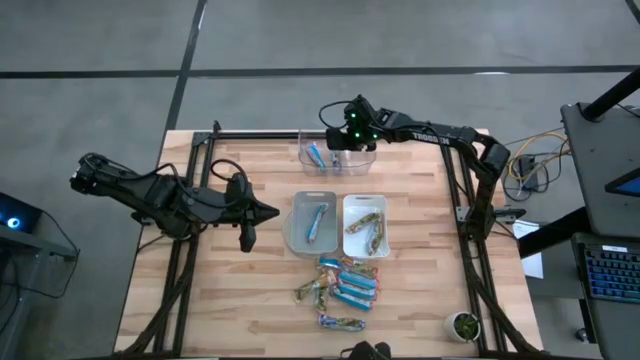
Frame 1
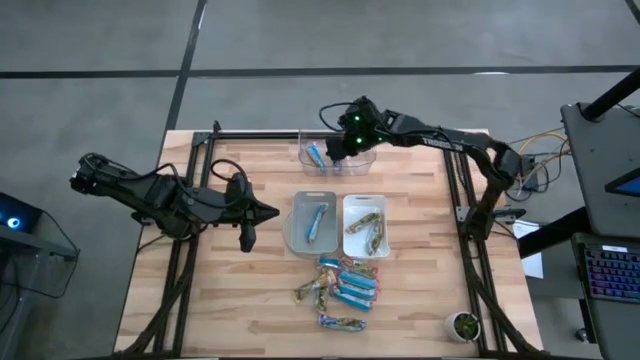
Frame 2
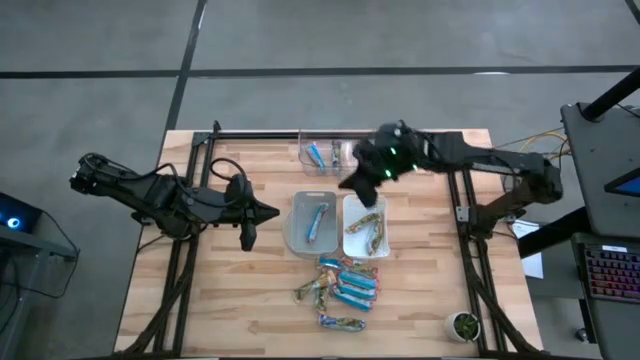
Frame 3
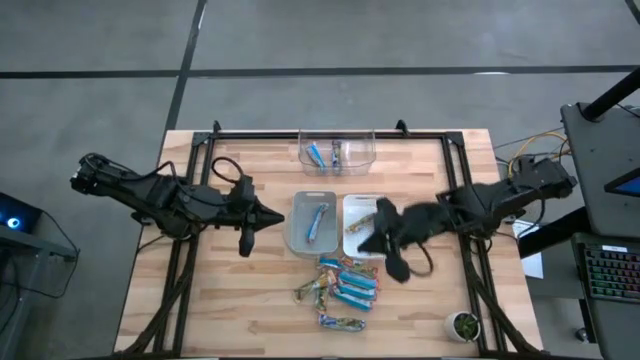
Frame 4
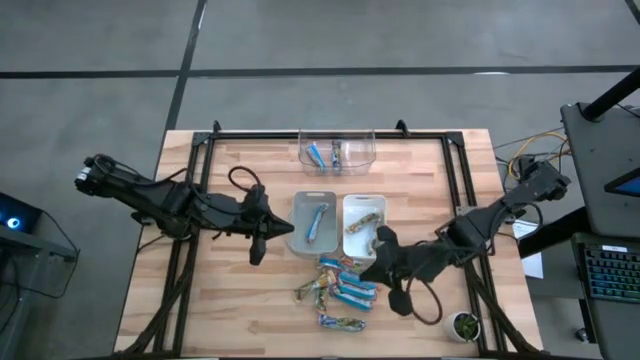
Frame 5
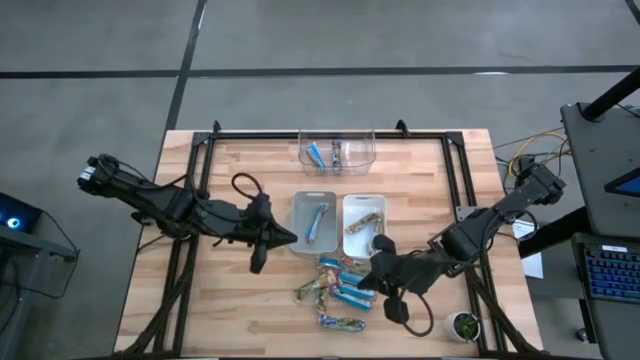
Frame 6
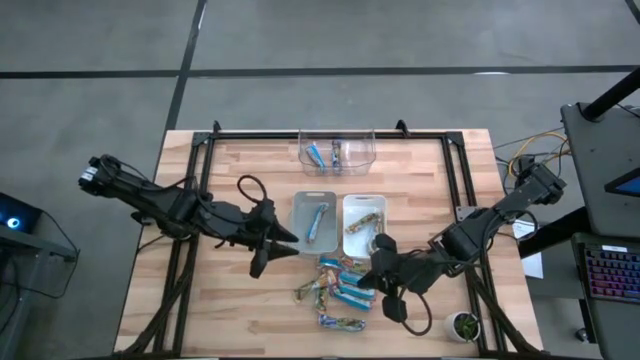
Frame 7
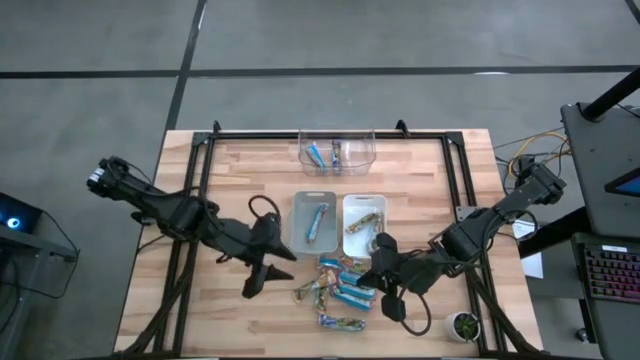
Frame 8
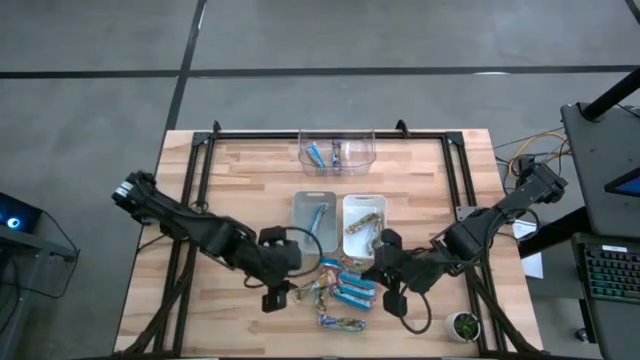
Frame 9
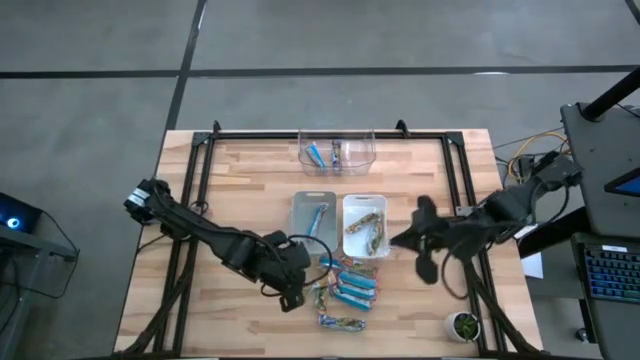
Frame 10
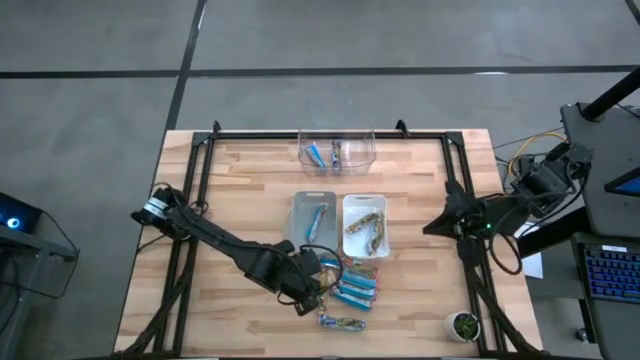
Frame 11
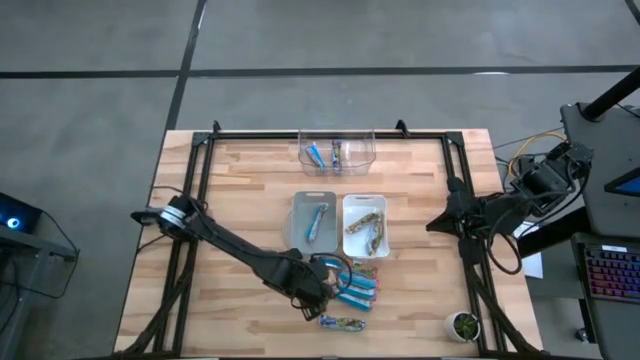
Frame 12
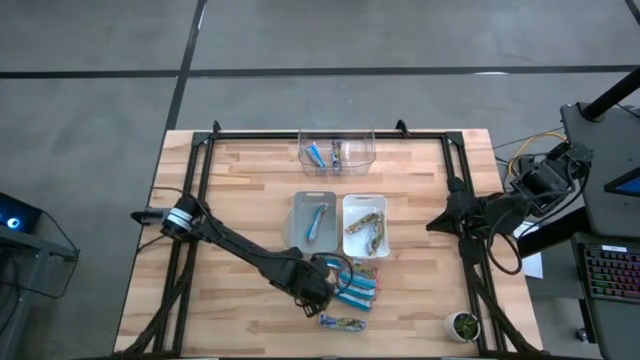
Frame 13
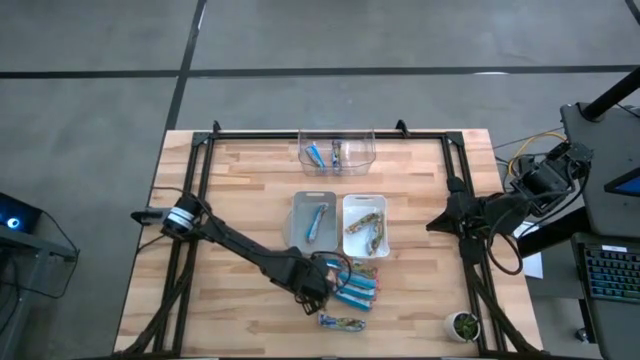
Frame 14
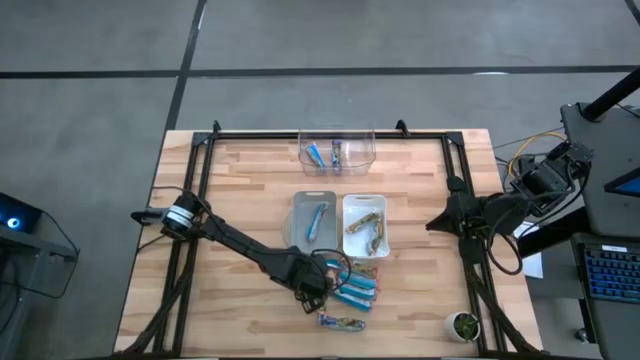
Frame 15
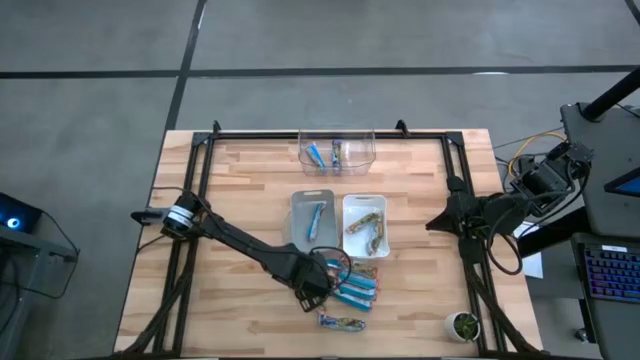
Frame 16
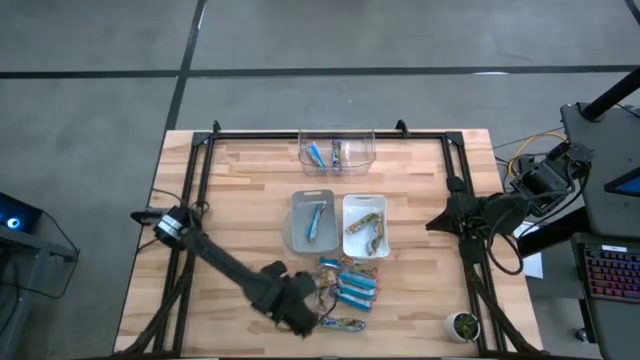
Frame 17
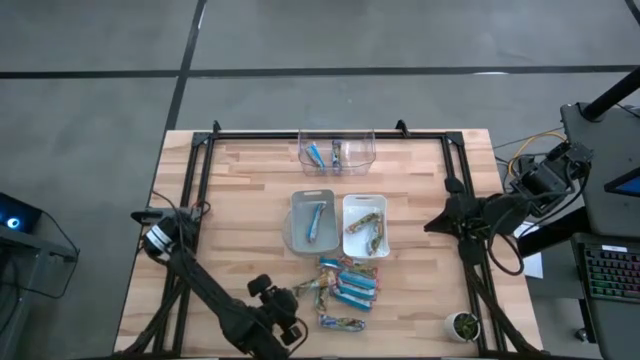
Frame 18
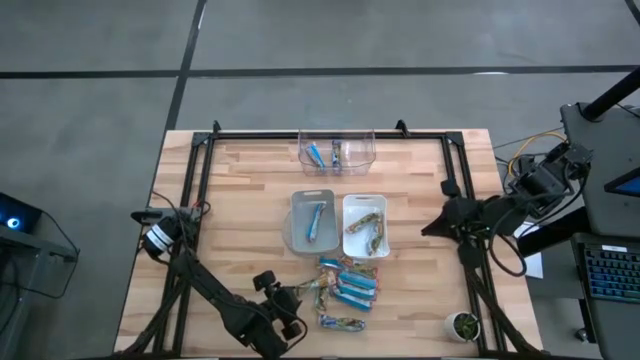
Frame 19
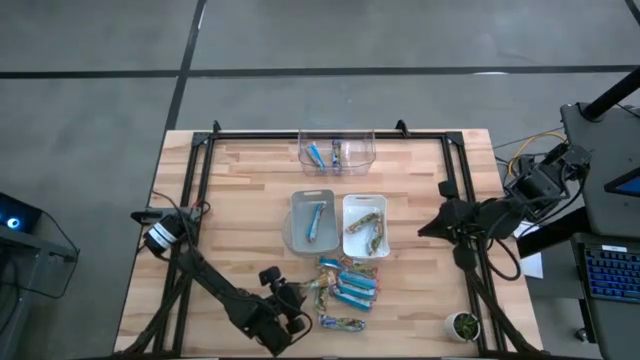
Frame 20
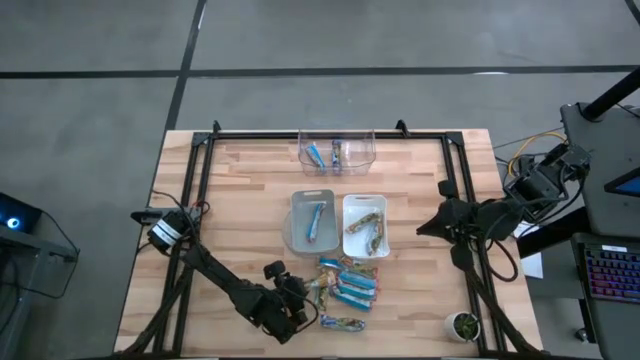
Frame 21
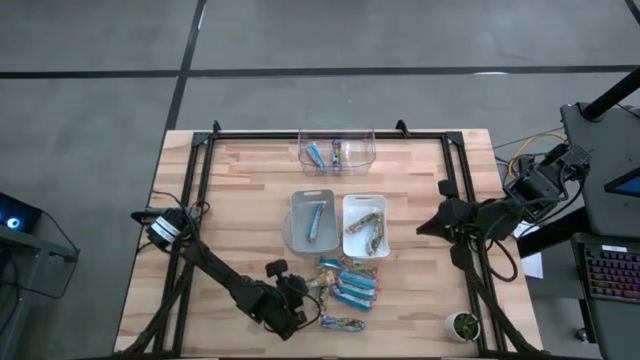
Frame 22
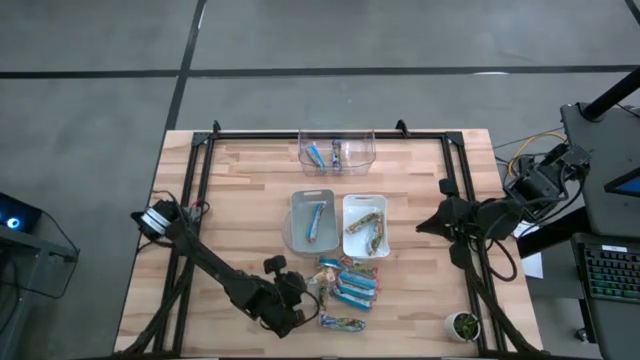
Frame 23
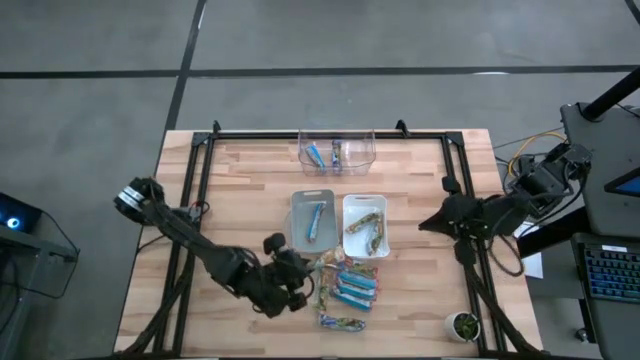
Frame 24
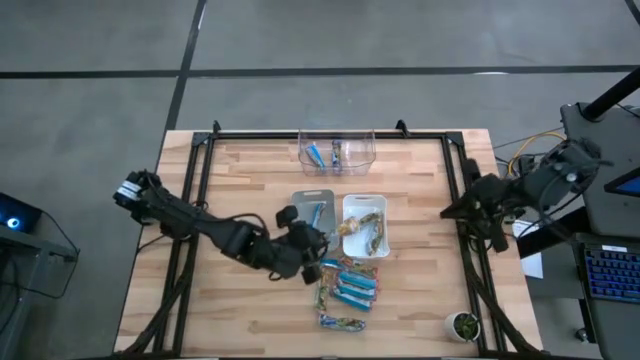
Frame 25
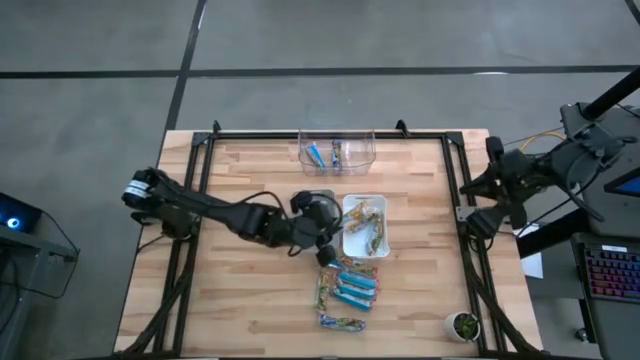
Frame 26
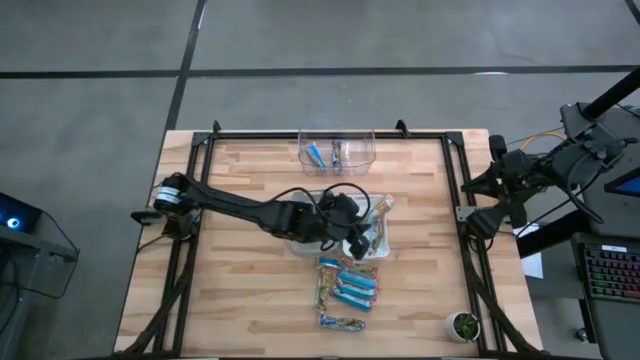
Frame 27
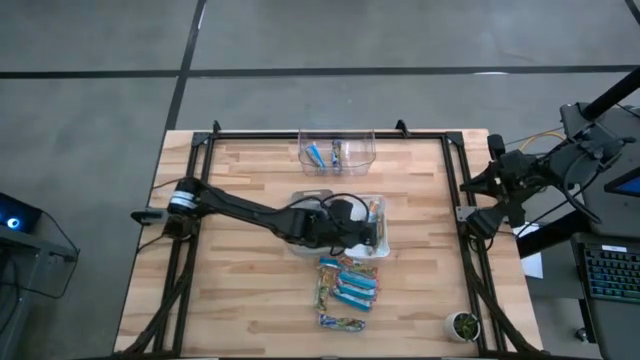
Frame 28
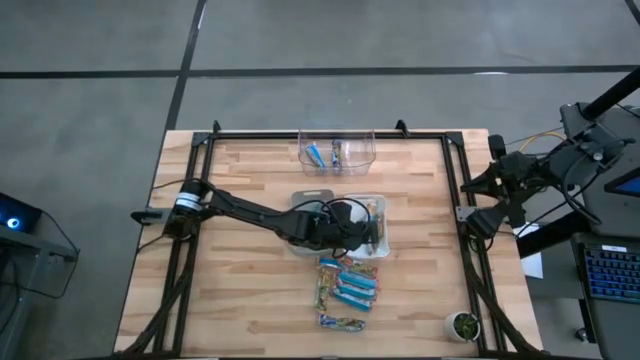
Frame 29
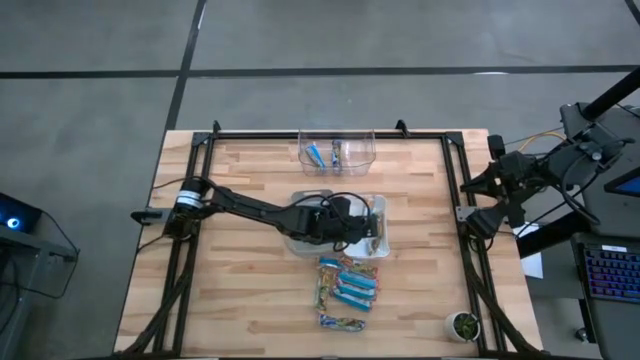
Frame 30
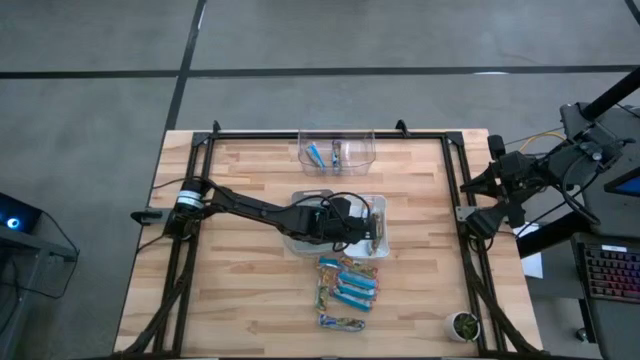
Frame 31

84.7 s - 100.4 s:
Task: Pick and place Granola Bars by type
Put the orange granola bar into the white bin

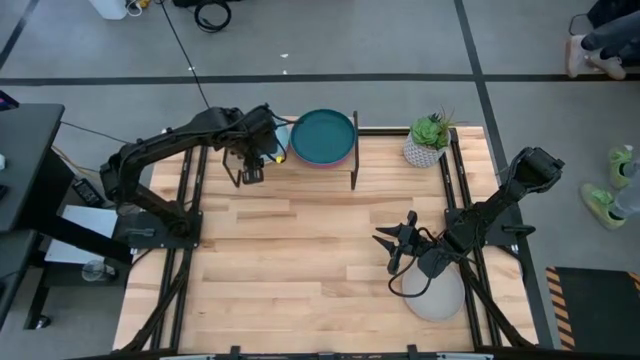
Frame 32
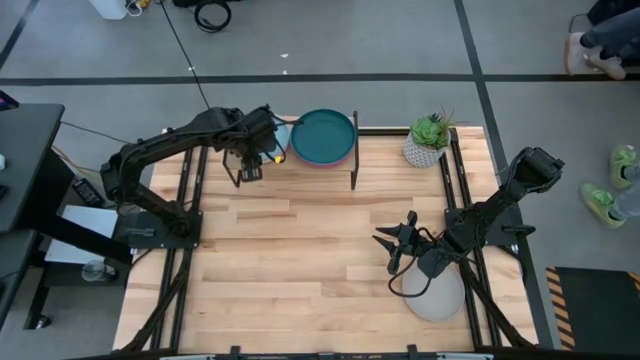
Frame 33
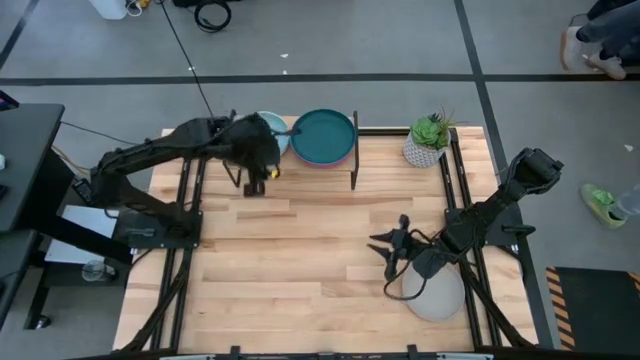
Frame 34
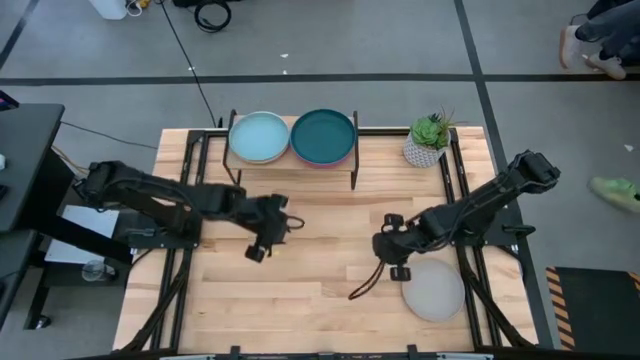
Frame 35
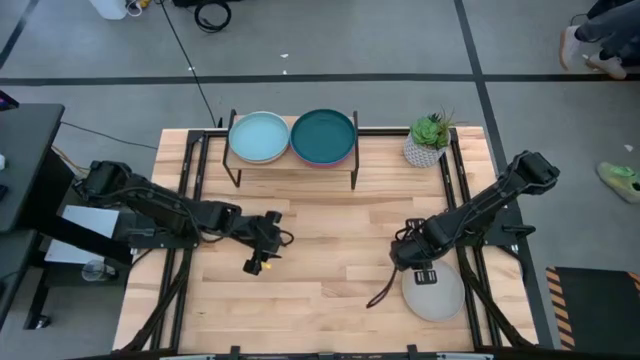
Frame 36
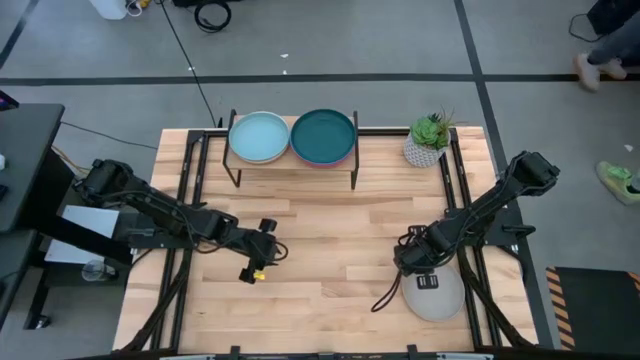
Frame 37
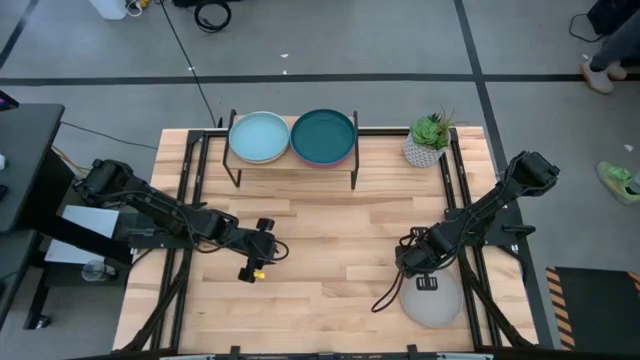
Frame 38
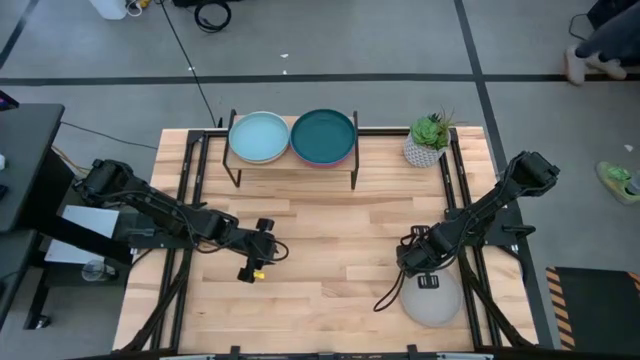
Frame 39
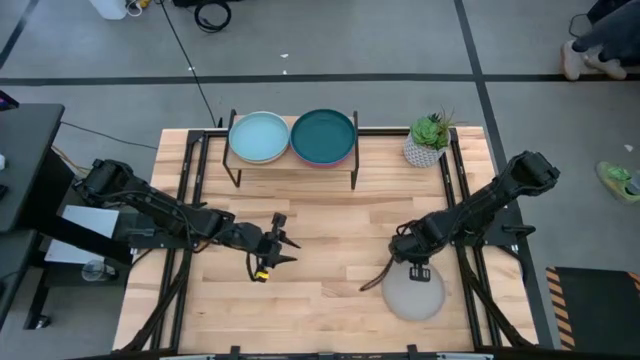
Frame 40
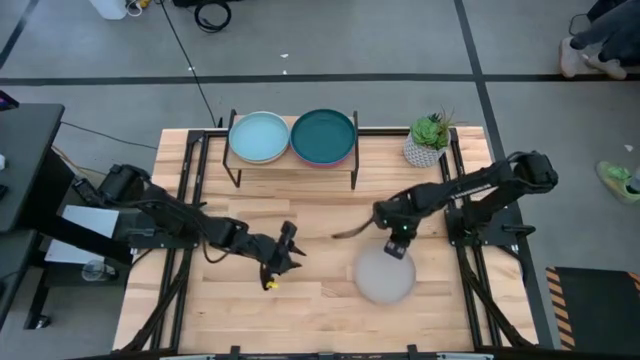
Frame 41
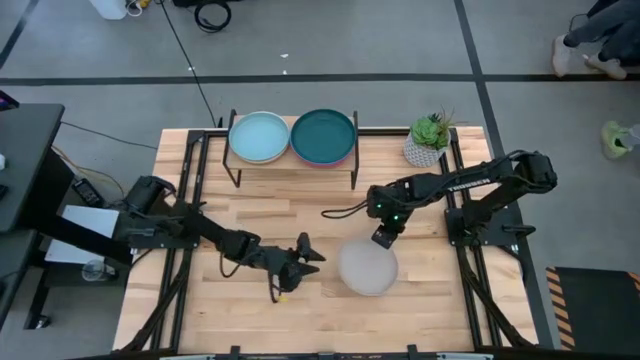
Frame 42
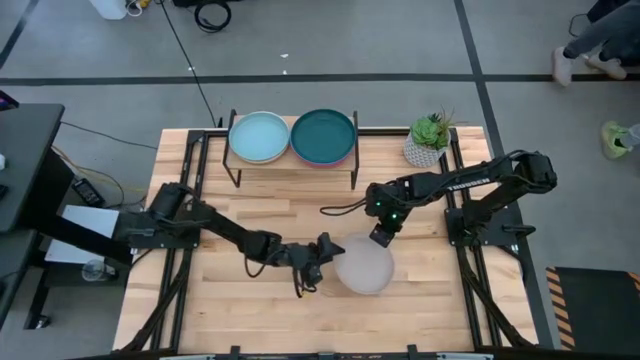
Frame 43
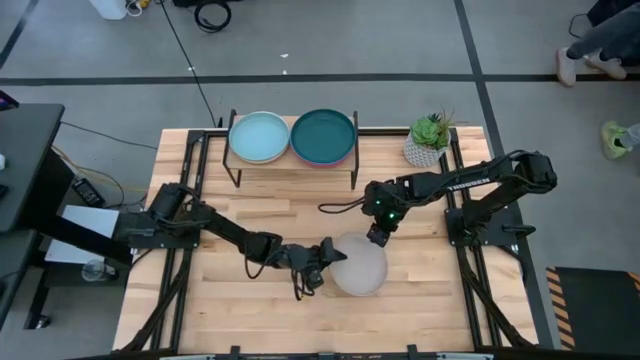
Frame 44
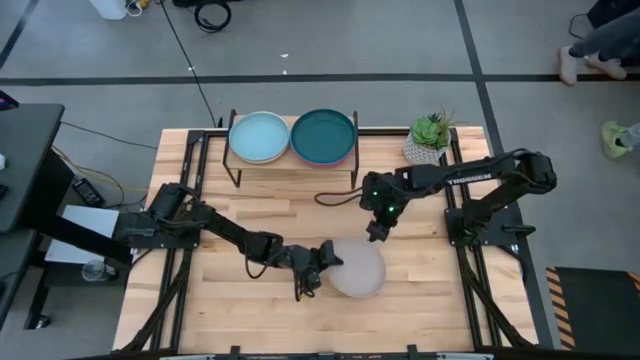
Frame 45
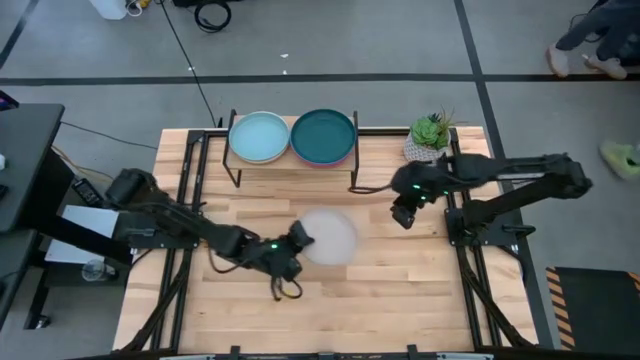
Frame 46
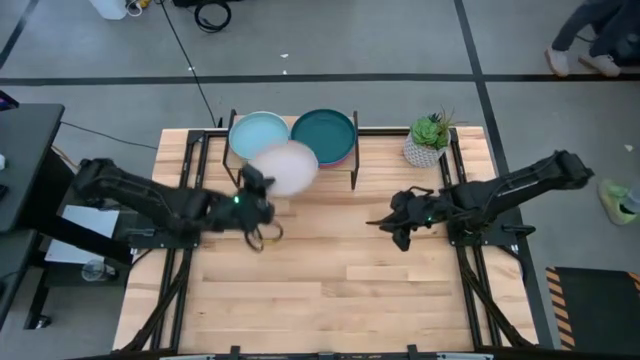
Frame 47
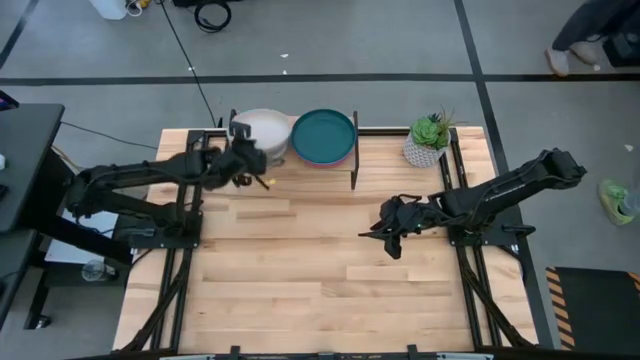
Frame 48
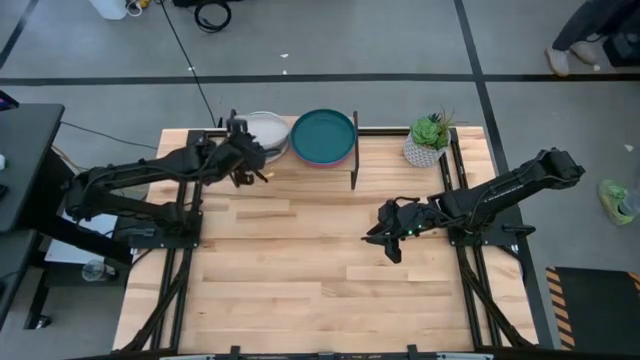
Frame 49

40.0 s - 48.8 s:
Task: Place and stack plates onto a shelf
Stack the gray plate on top of the blue plate on the shelf
